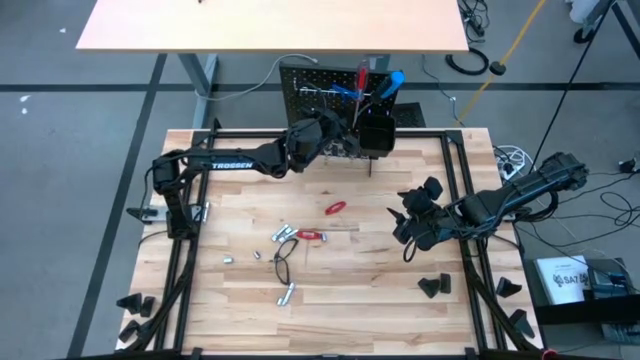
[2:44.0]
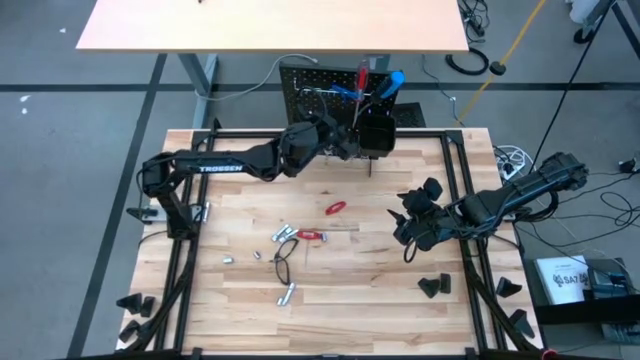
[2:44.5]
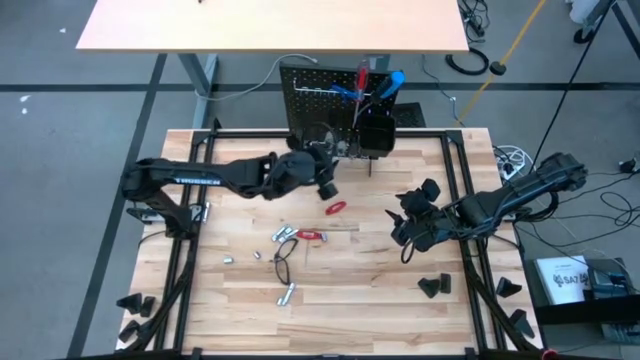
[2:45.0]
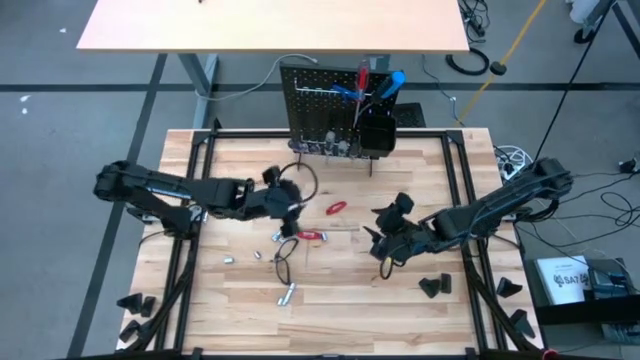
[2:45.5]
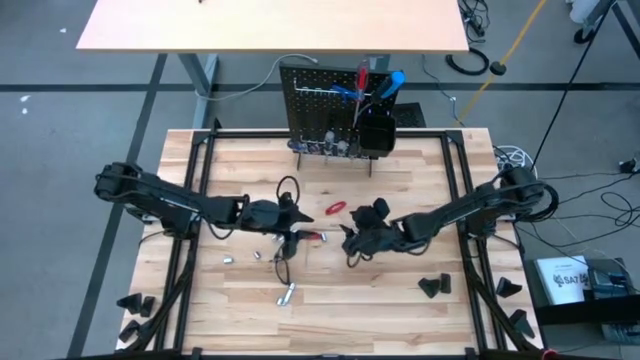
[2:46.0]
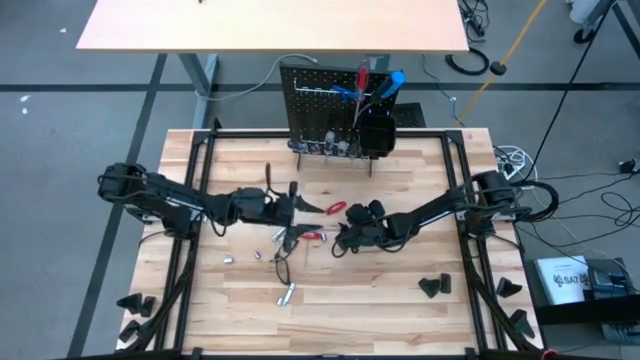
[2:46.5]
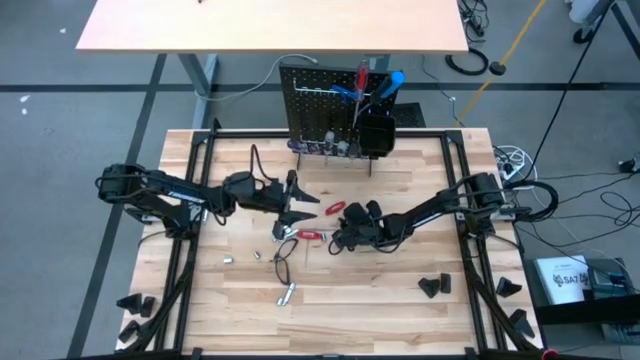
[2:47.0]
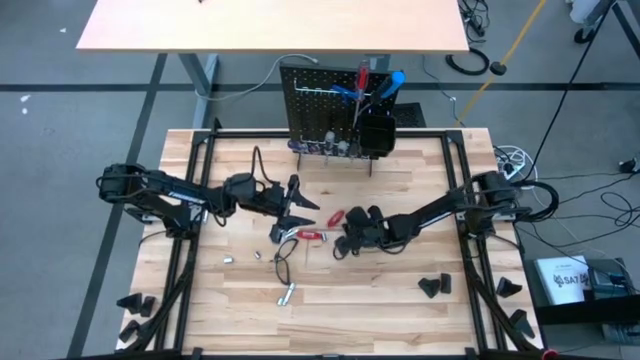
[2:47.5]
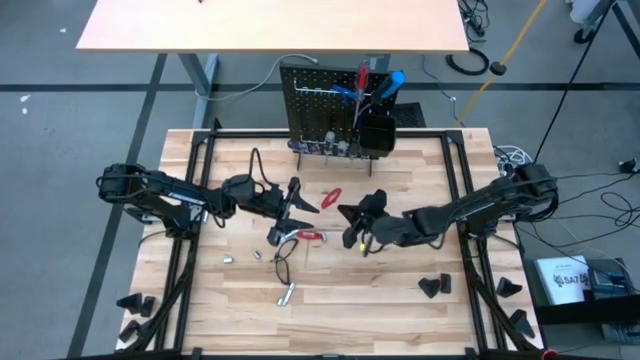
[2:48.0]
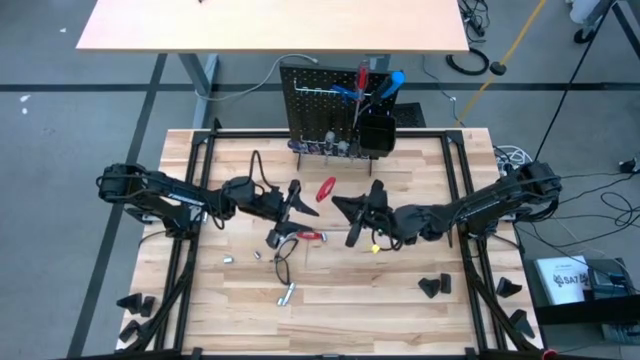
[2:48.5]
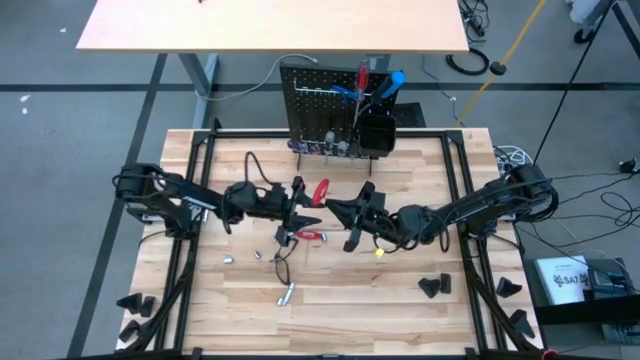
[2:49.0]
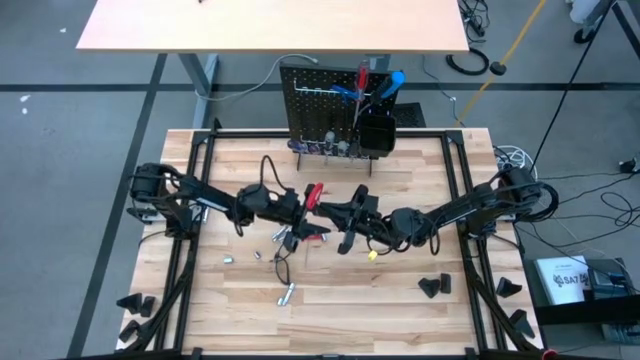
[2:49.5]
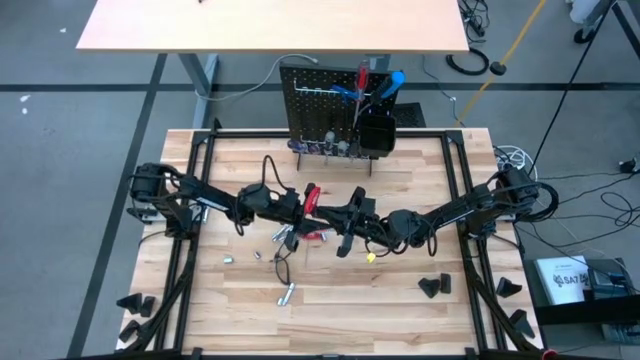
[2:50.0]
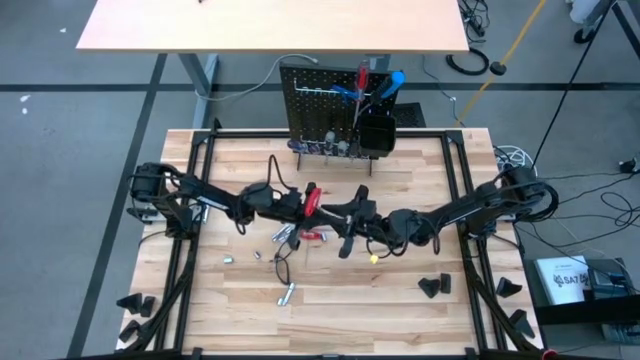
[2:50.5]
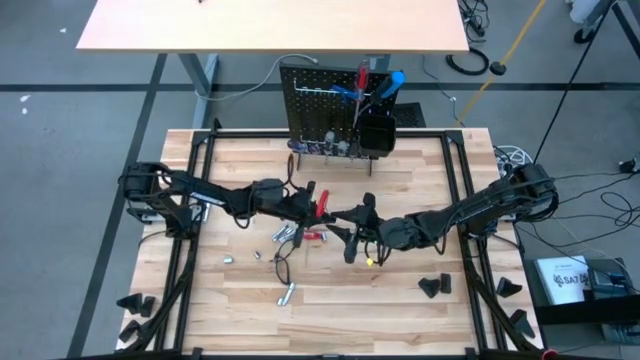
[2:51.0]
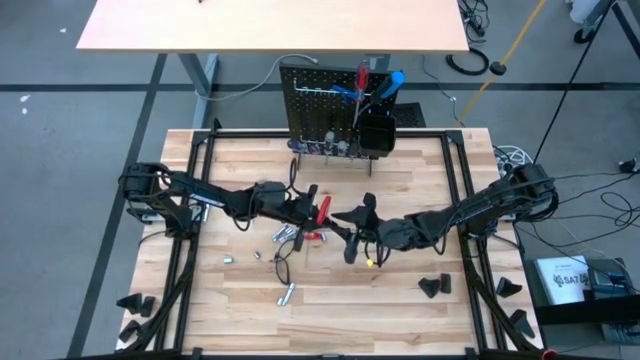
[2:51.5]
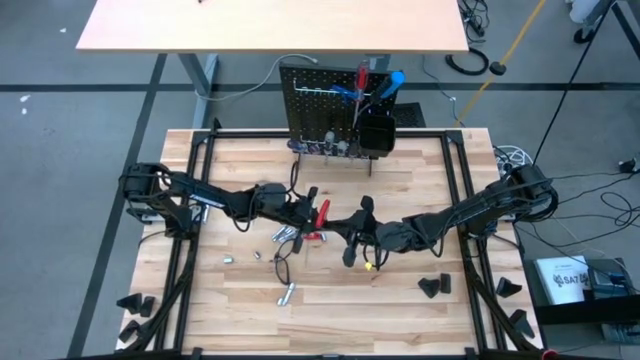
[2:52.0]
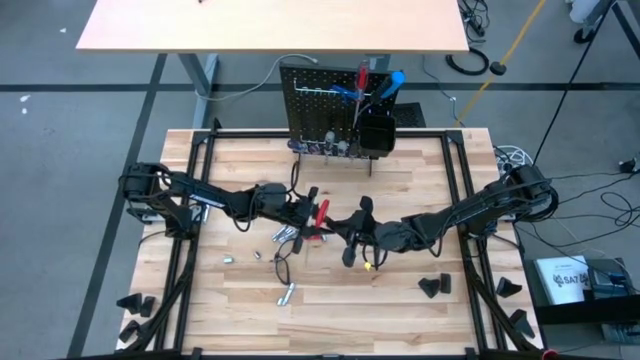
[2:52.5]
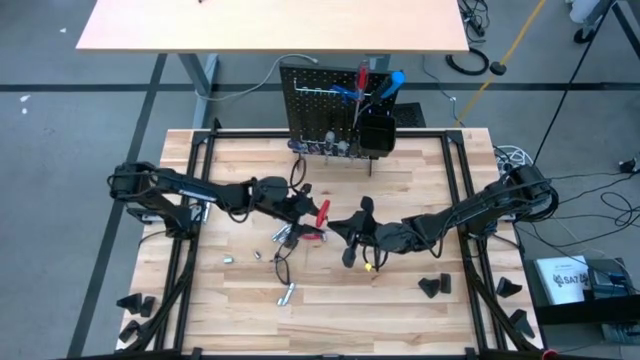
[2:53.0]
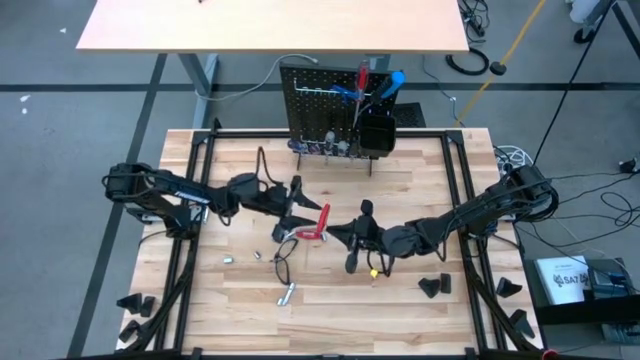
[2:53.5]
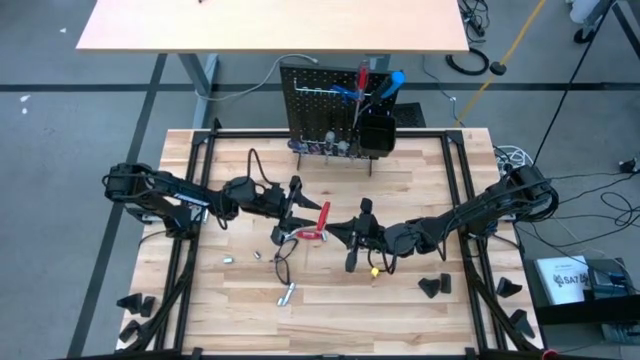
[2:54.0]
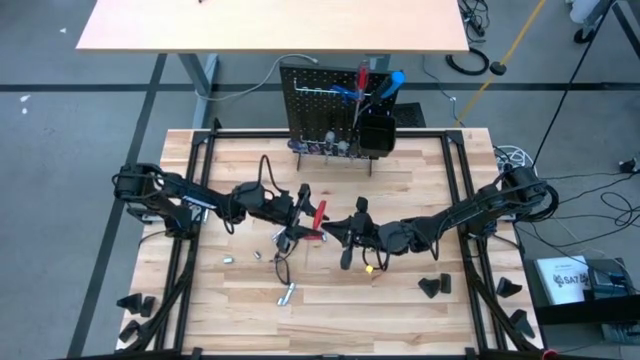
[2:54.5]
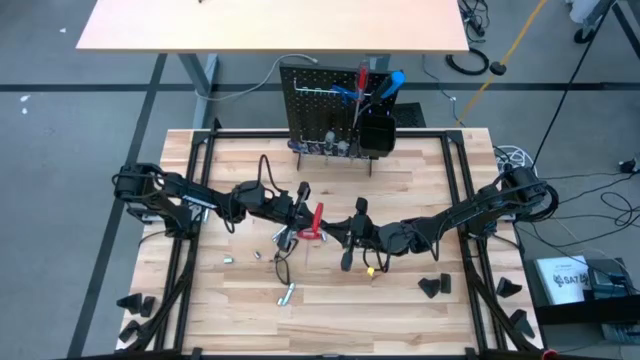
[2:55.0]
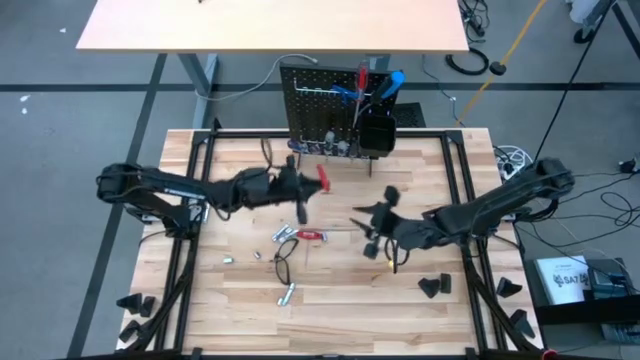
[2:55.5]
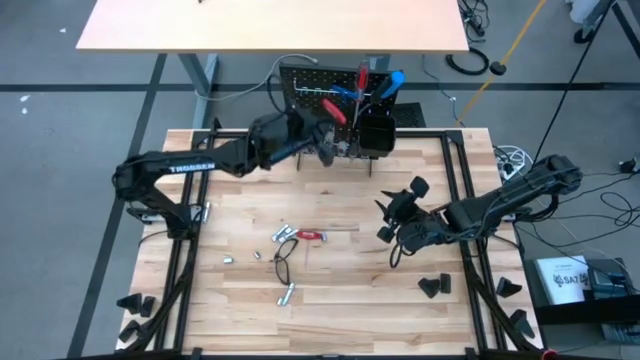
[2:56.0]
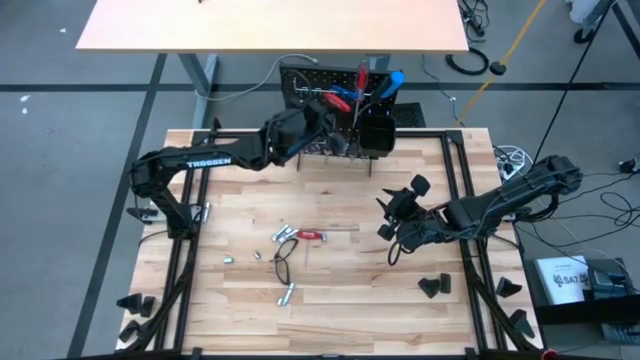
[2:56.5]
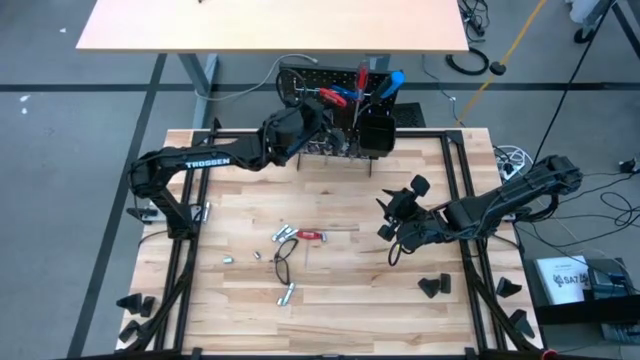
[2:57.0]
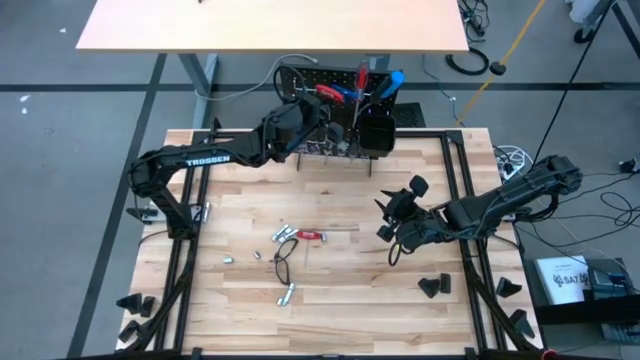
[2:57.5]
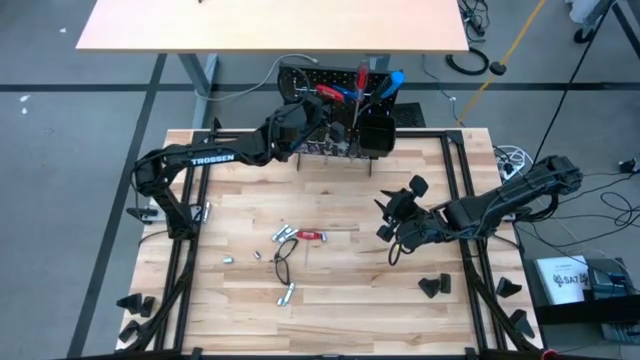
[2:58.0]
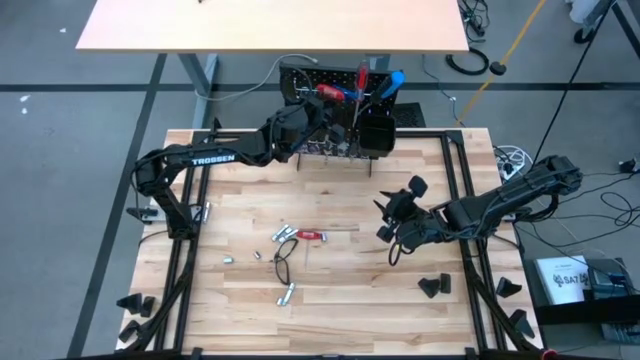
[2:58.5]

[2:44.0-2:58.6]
Task: Hang tools onto peg board
Hang the red allen wrench onto the peg board

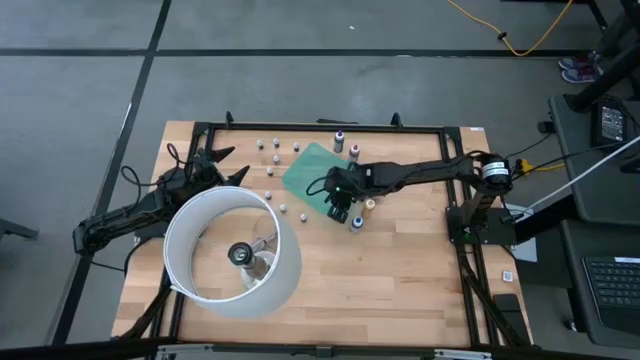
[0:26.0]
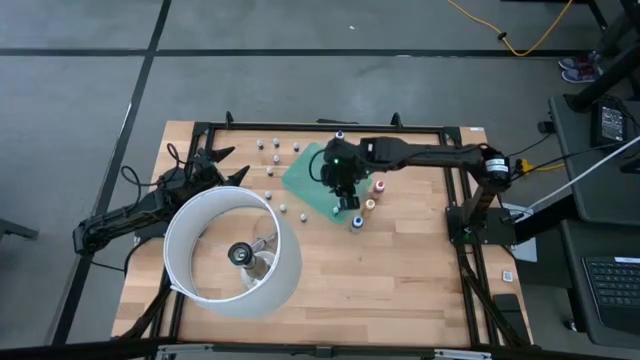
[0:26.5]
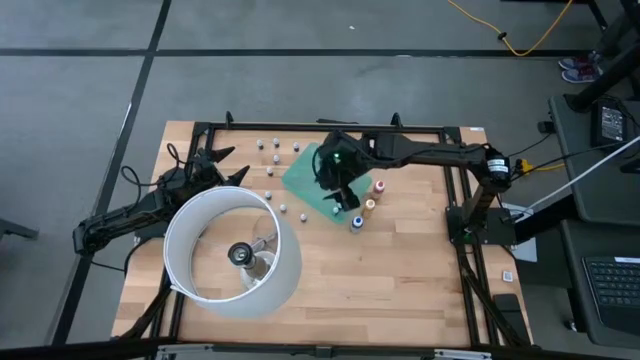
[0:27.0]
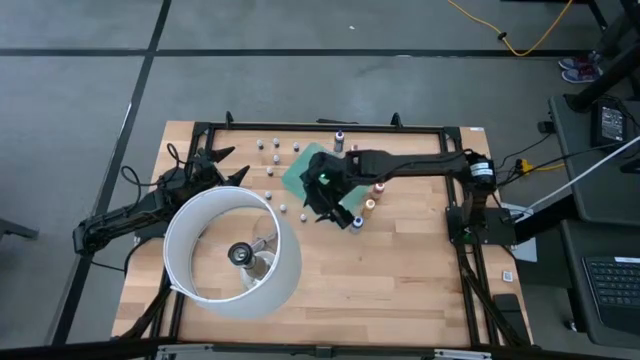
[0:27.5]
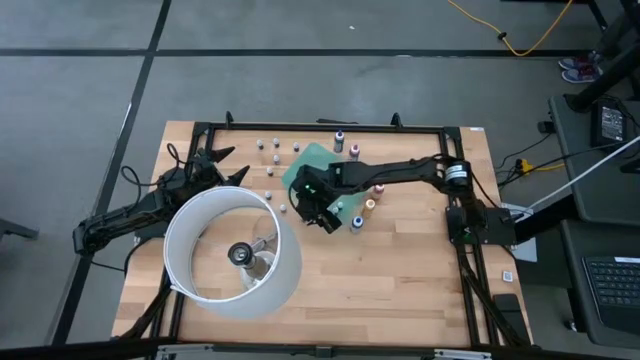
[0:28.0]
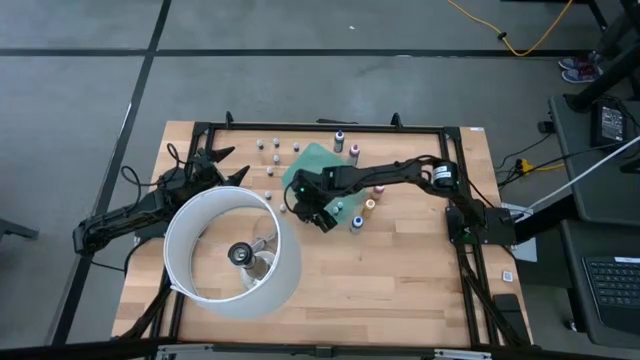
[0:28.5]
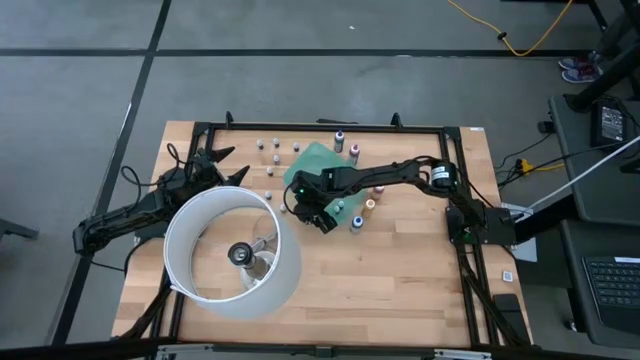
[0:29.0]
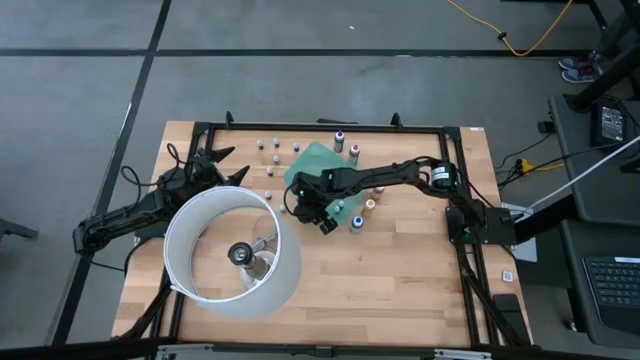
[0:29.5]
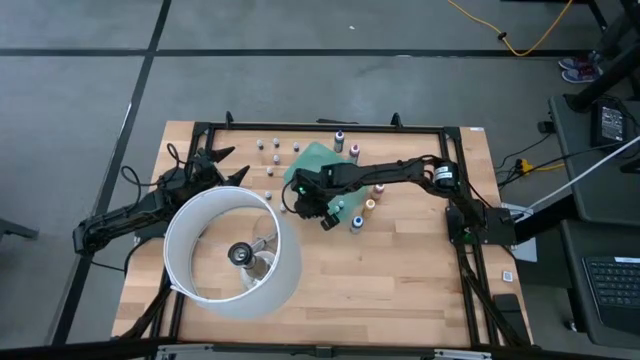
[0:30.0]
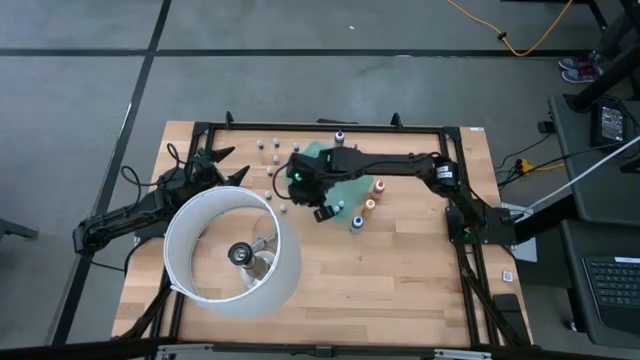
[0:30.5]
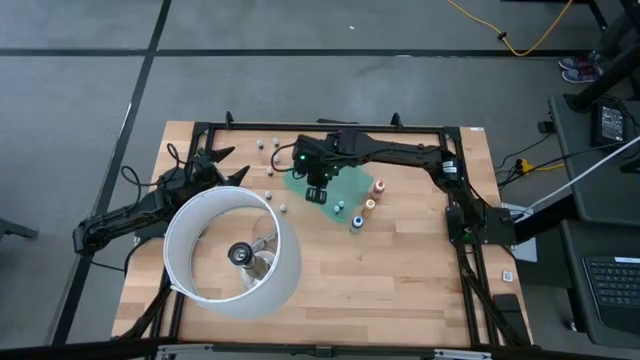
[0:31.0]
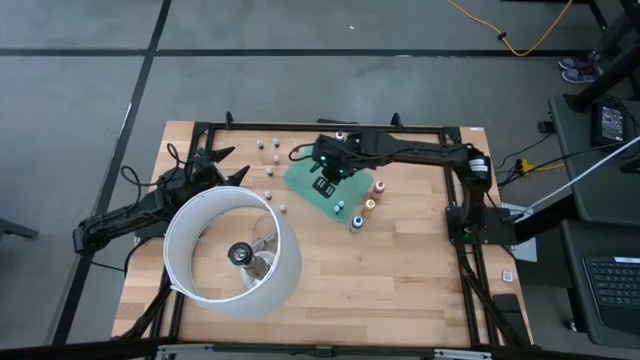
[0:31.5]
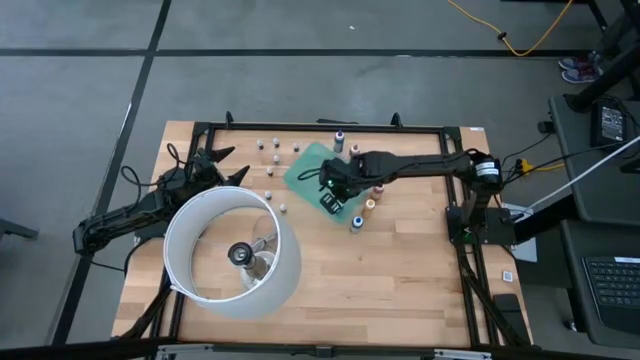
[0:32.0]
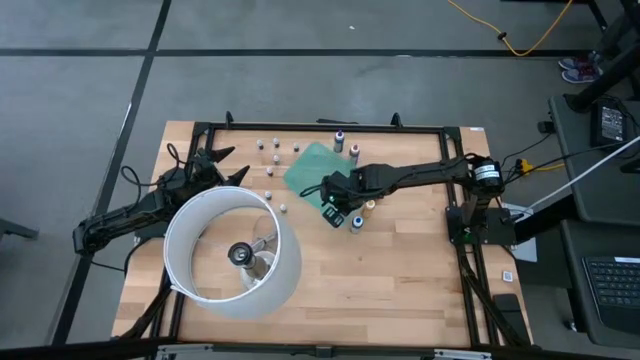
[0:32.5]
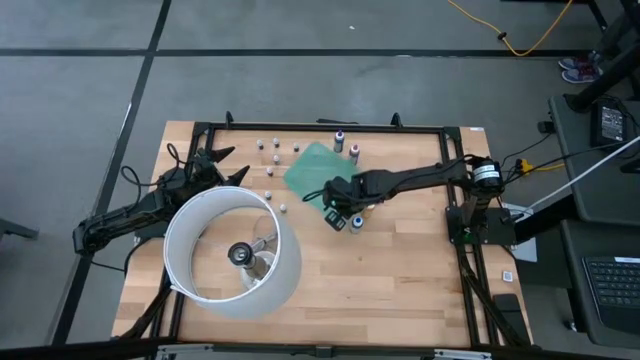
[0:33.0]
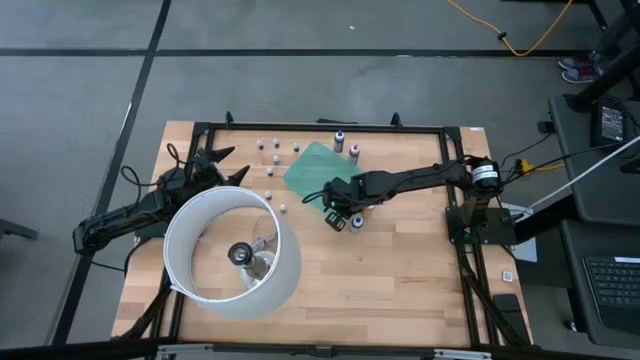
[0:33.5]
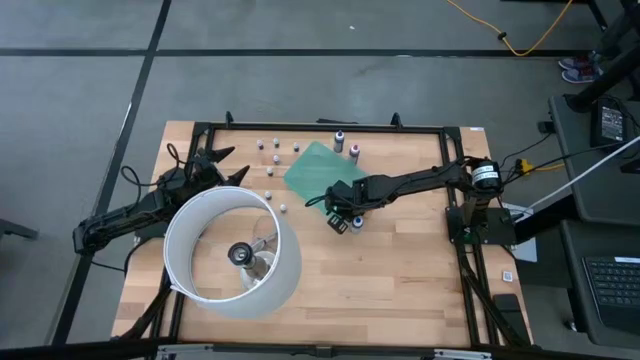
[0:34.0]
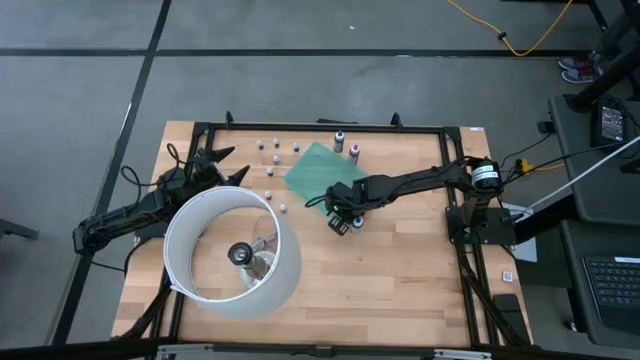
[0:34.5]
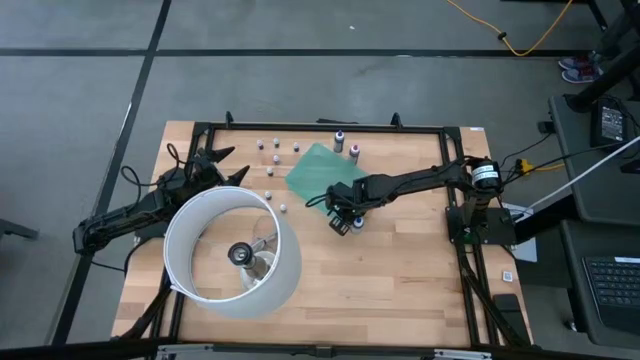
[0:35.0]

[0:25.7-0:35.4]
Task: Pick & Place food coloring
Put the small blue food coloring bottle into the green bin
